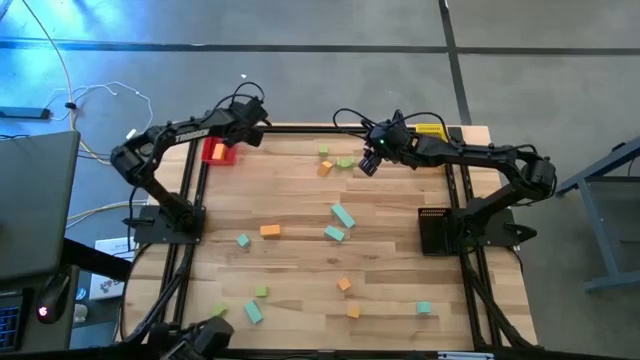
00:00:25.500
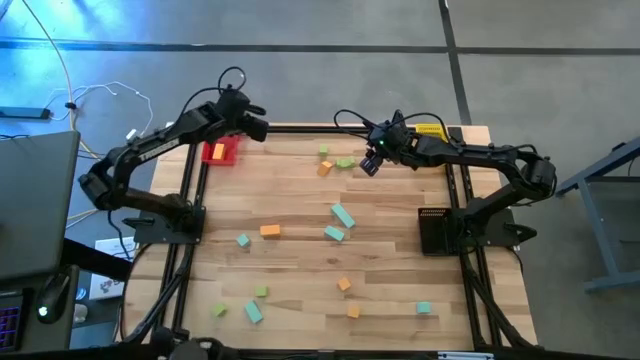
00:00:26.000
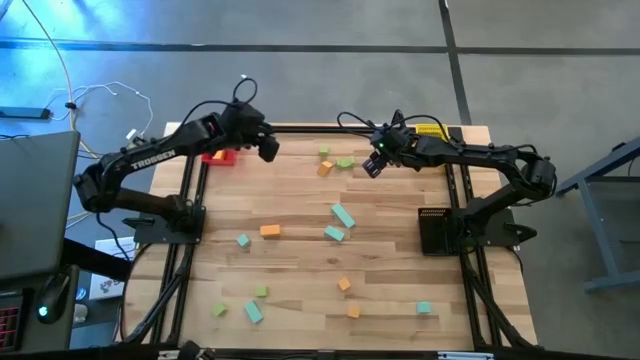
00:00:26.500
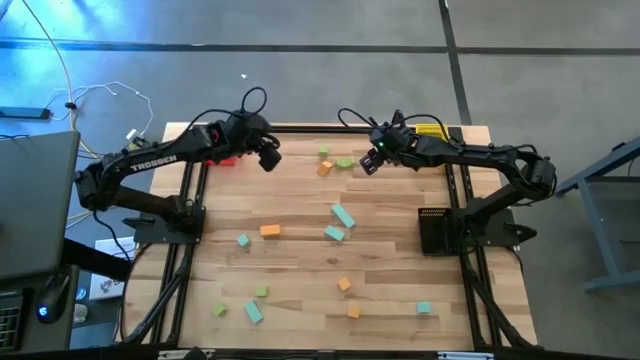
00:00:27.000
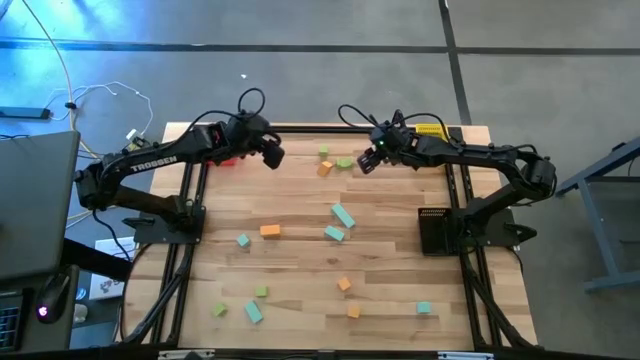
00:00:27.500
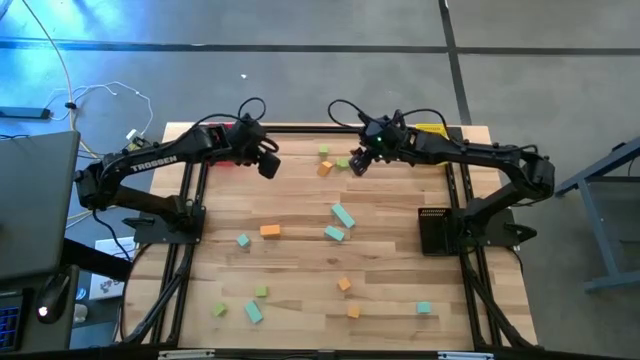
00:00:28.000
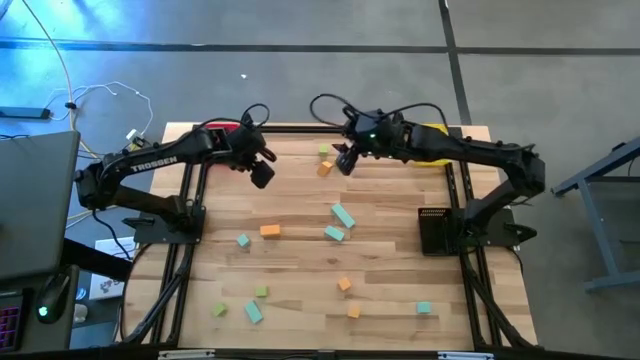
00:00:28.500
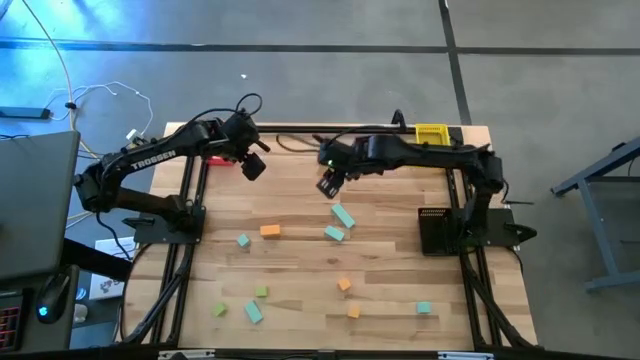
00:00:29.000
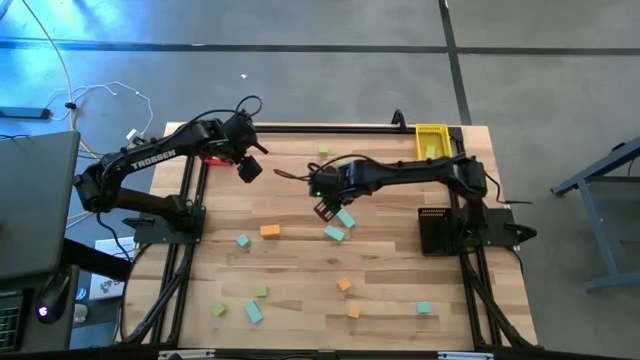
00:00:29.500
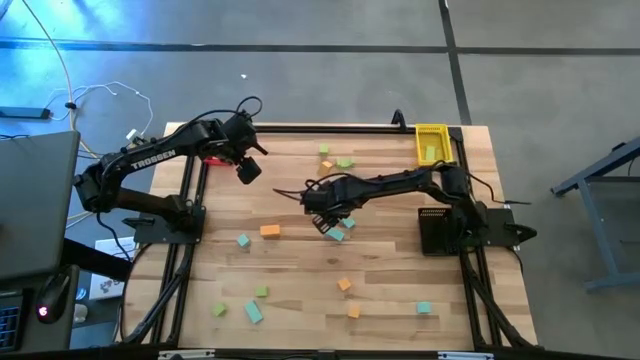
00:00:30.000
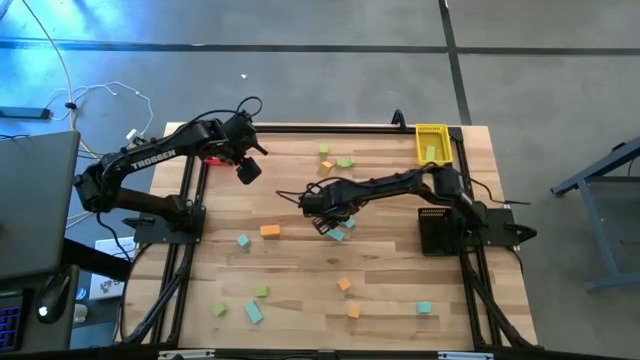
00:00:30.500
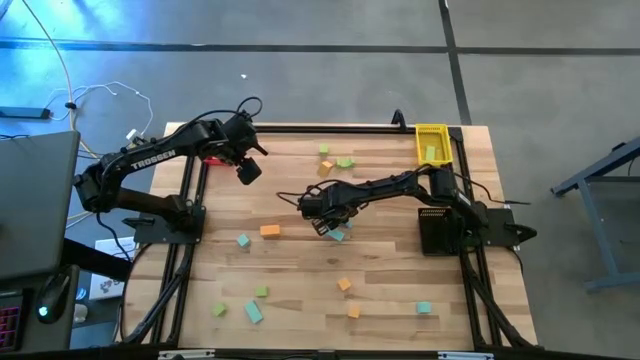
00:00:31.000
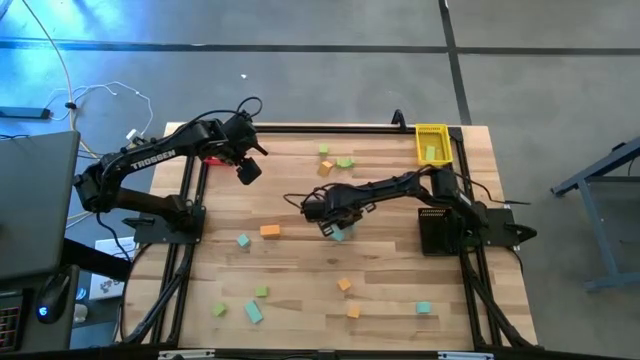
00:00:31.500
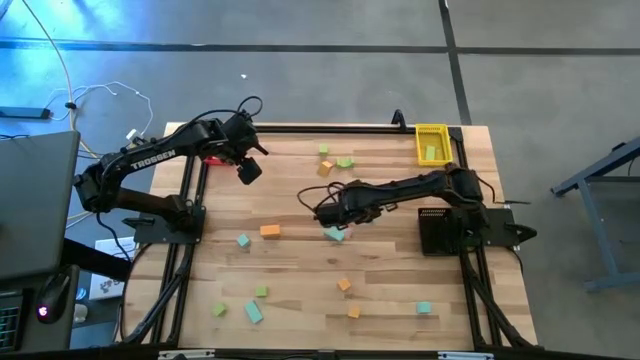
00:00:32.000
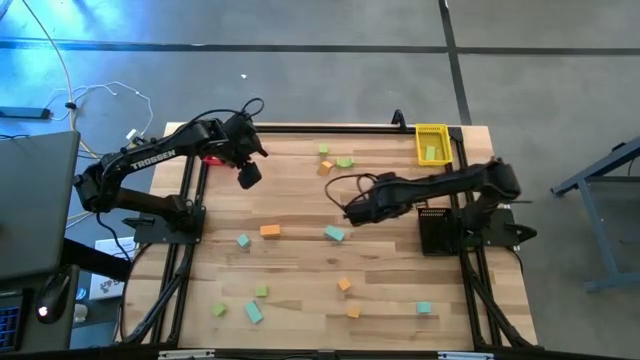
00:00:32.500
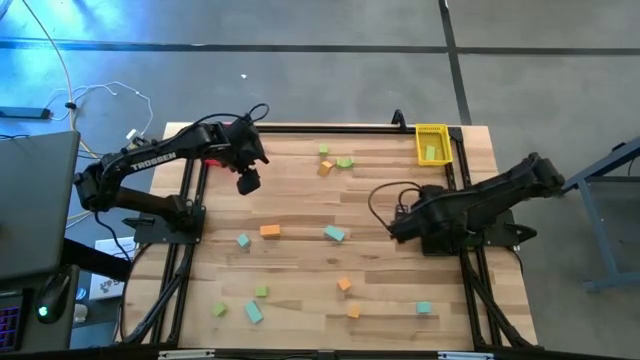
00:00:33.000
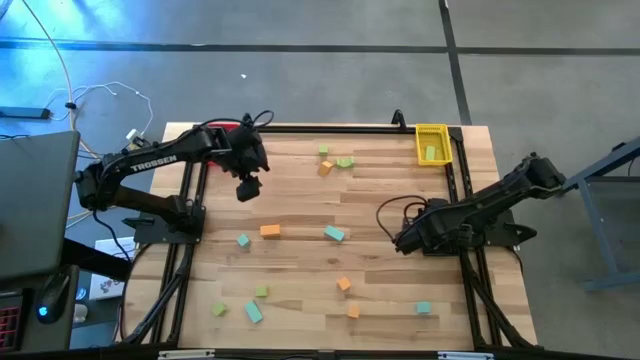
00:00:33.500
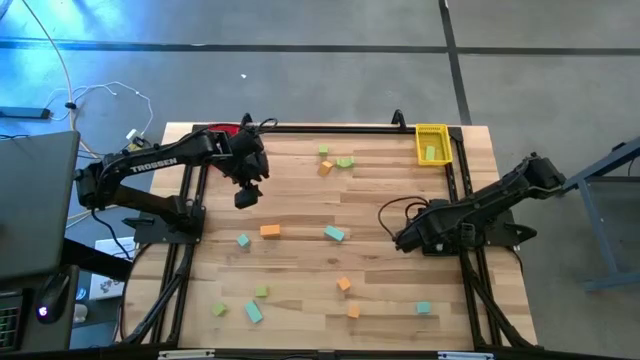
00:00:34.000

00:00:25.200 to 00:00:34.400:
Task: Sort & place blocks by color
Put the blue block into the black bin

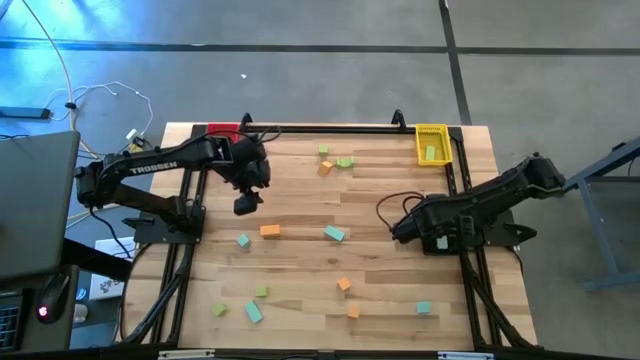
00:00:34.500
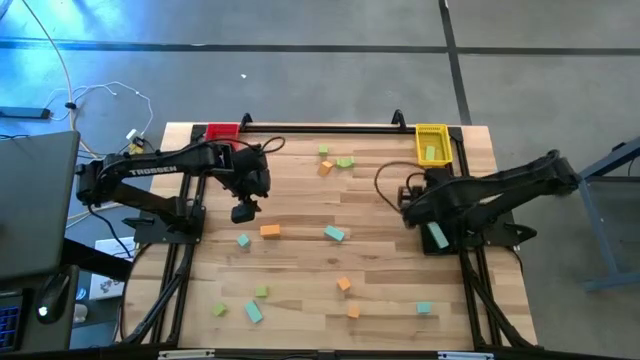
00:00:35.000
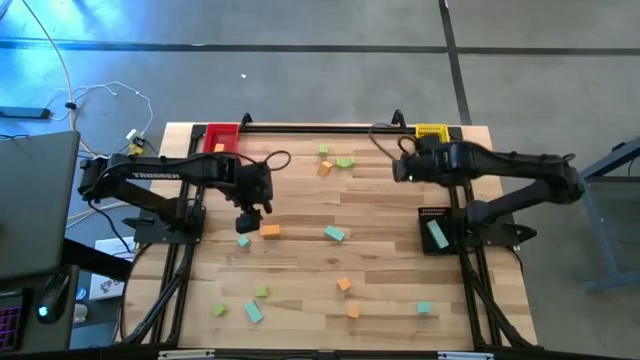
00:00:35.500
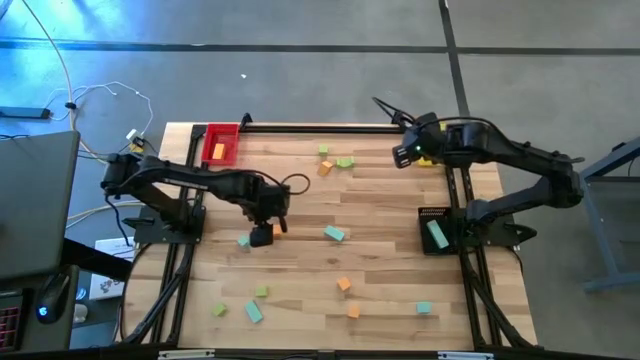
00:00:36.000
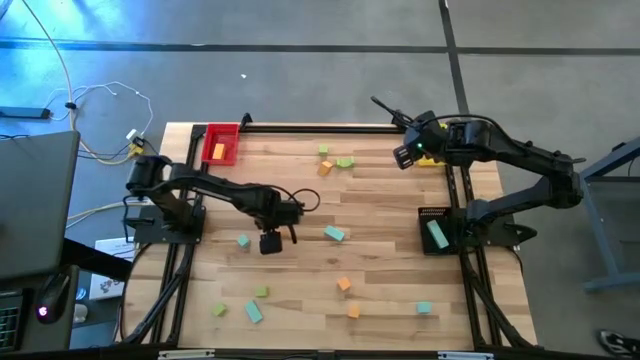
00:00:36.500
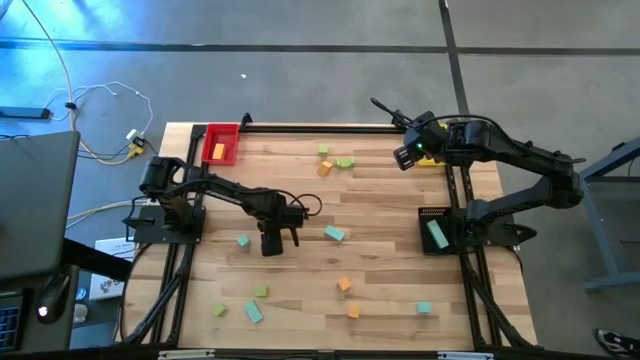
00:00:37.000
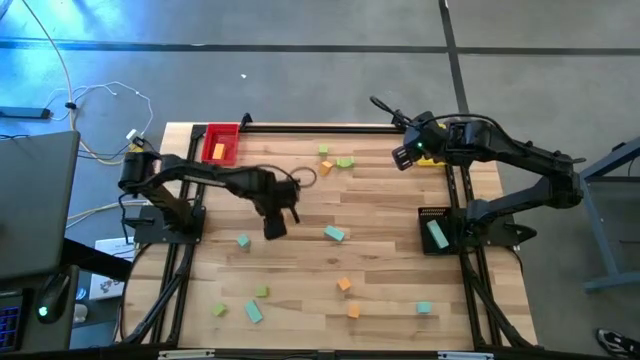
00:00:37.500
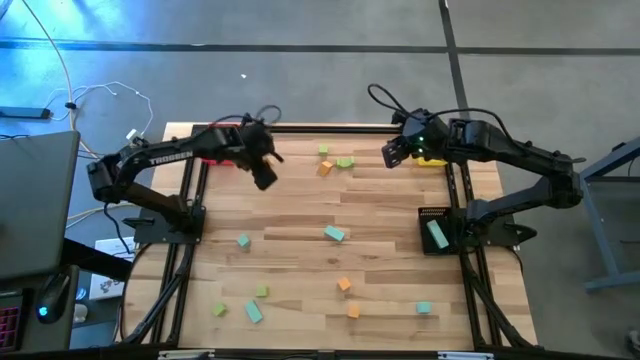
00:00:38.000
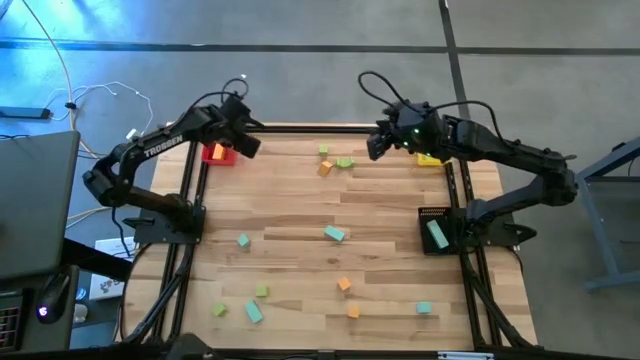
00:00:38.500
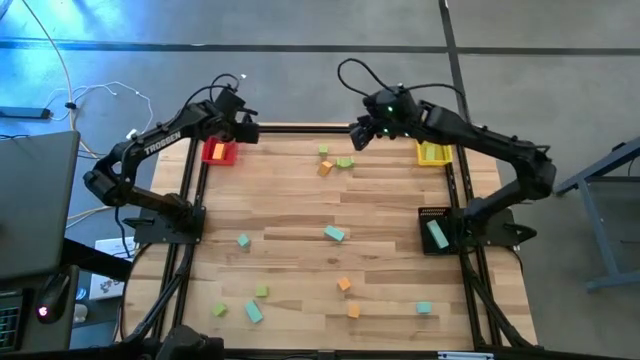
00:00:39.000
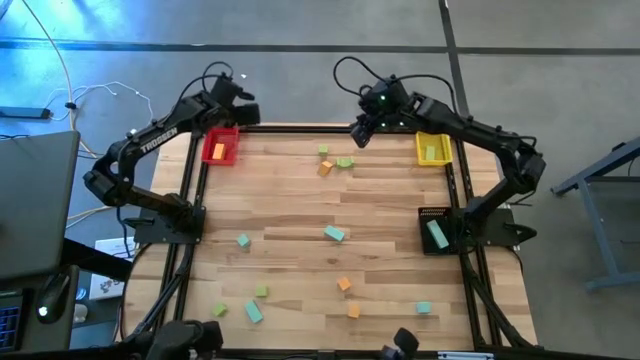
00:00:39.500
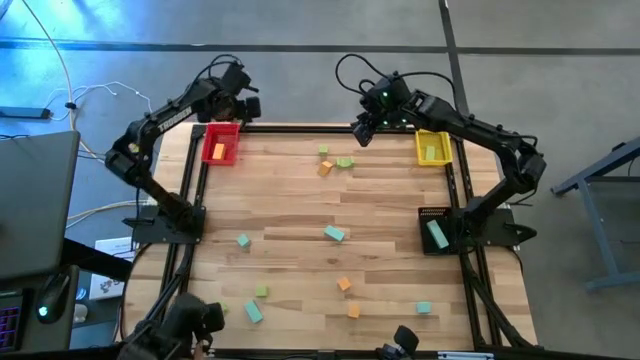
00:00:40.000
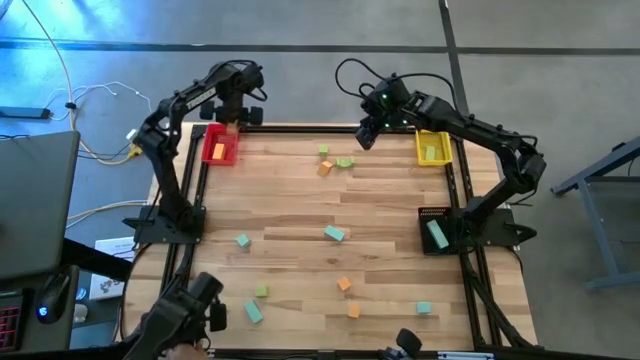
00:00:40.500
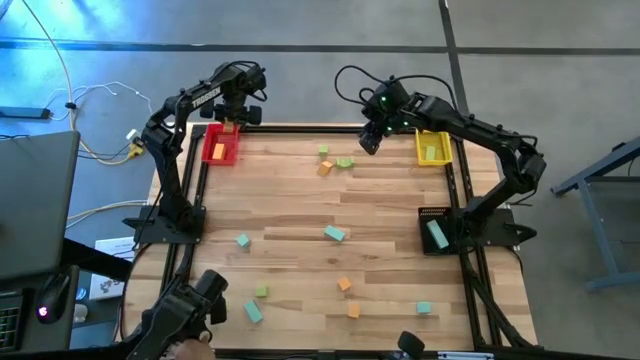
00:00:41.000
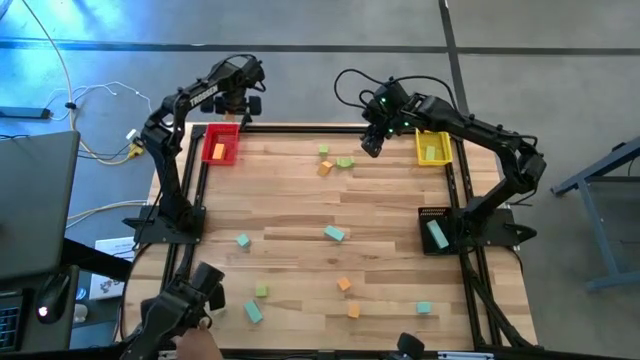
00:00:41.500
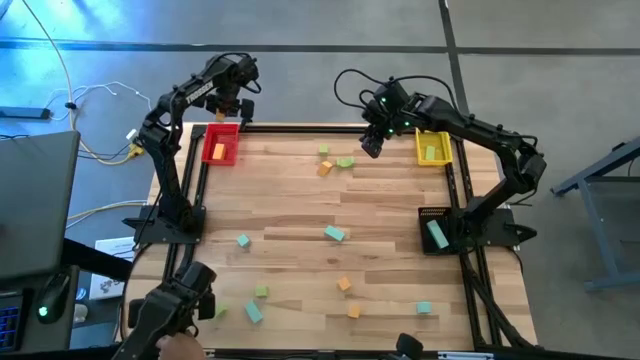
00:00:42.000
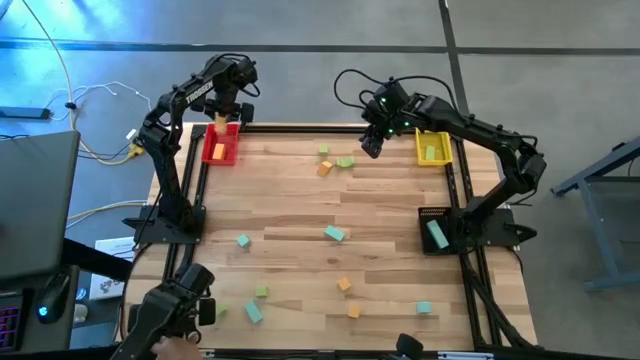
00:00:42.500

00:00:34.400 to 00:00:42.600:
Put the yellow block into the red bin

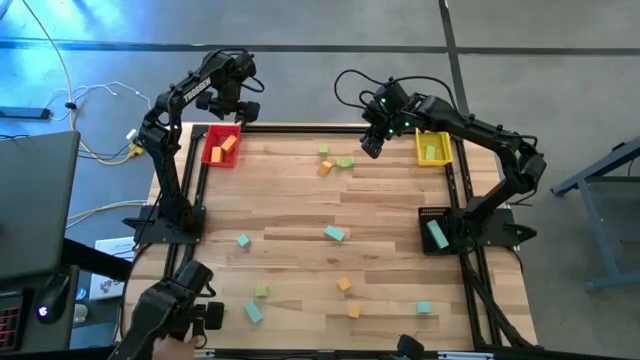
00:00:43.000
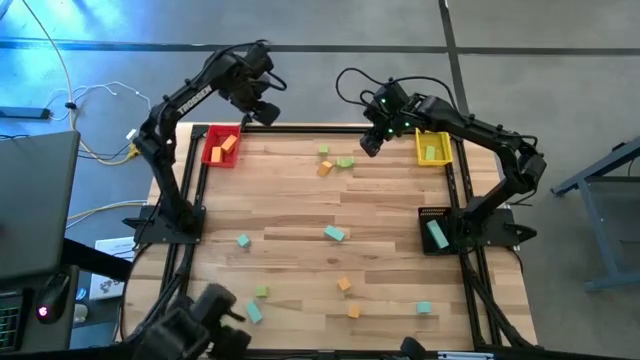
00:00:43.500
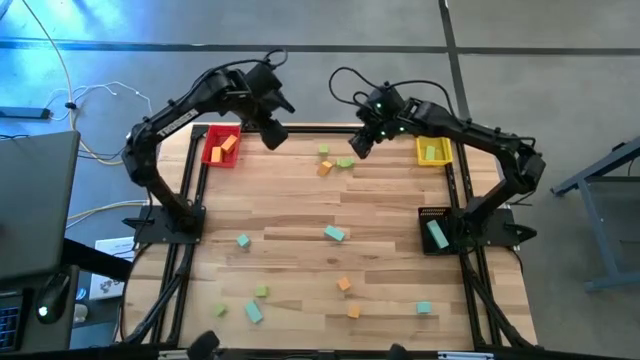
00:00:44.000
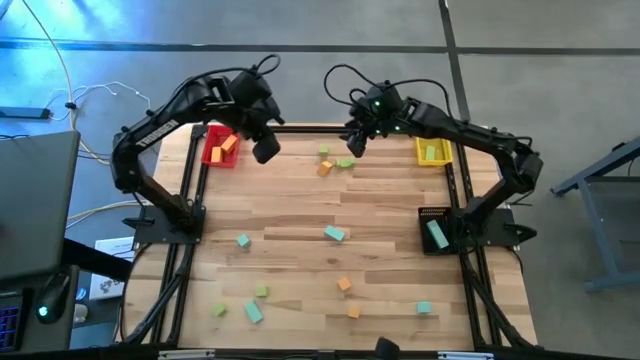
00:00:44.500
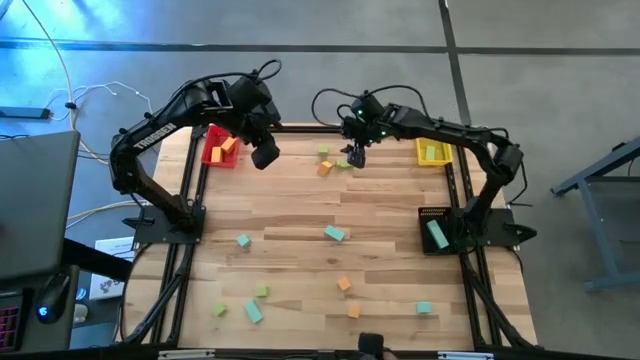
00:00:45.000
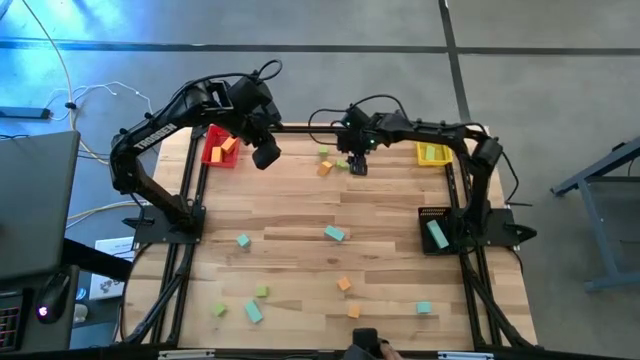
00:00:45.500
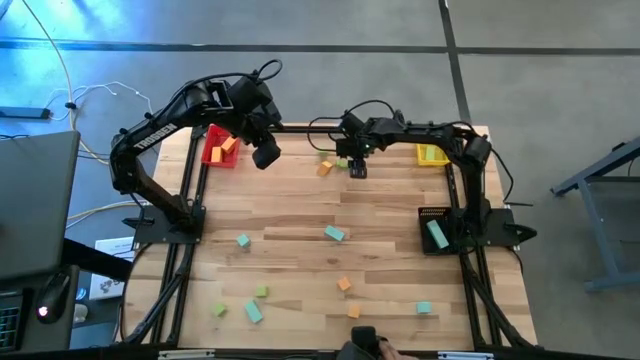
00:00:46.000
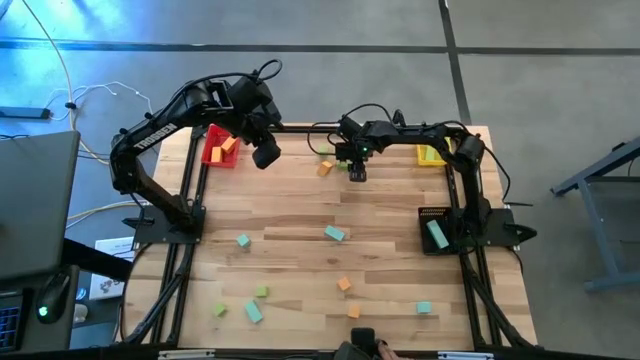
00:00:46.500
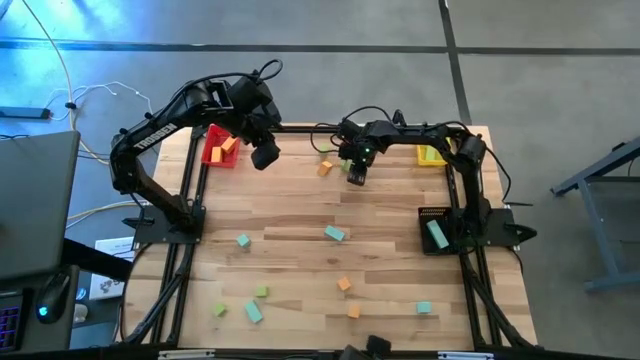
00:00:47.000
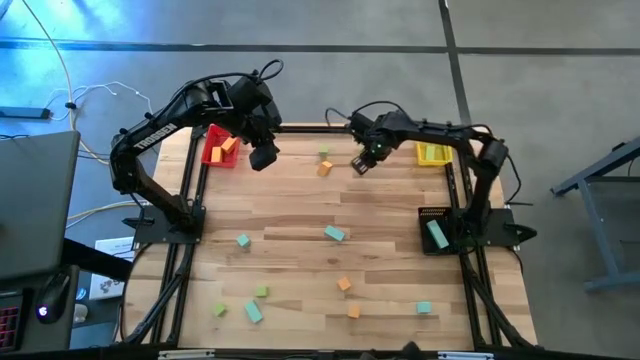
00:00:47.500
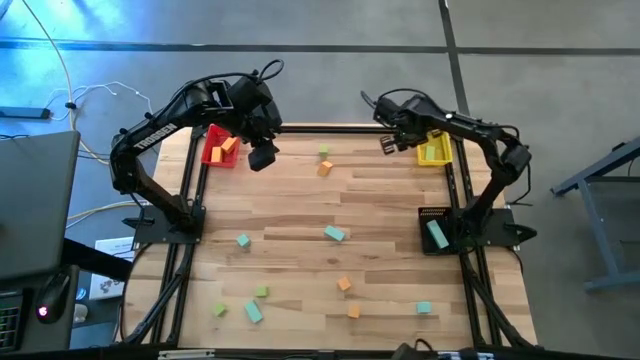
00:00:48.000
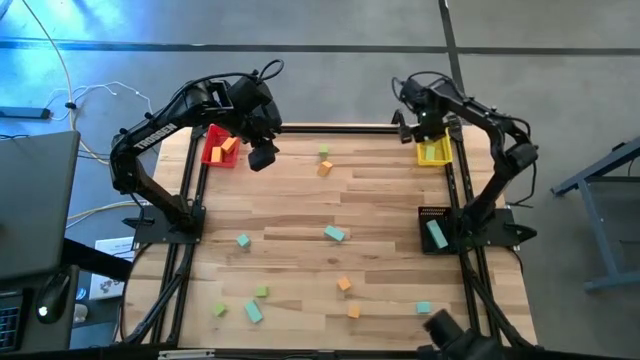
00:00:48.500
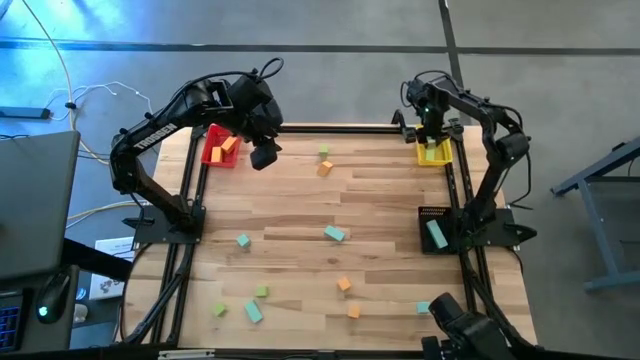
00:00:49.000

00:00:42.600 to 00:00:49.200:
Put the green block into the yellow bin
